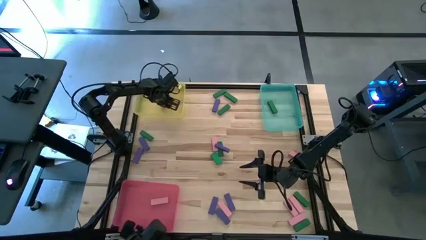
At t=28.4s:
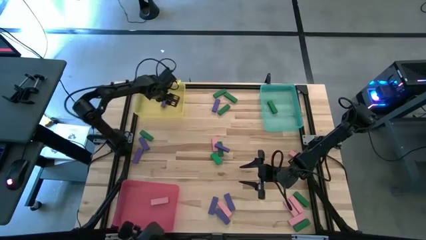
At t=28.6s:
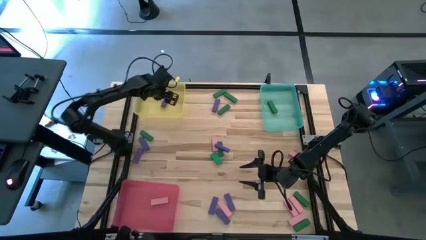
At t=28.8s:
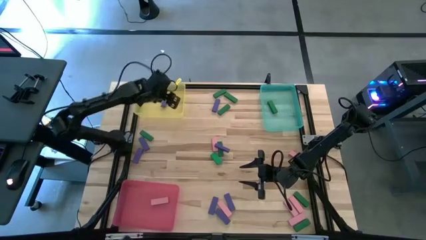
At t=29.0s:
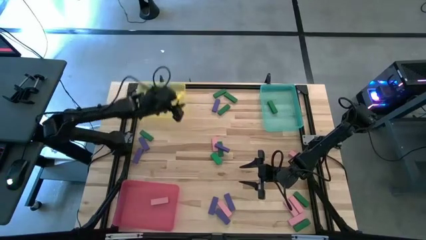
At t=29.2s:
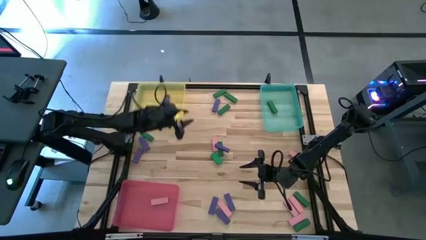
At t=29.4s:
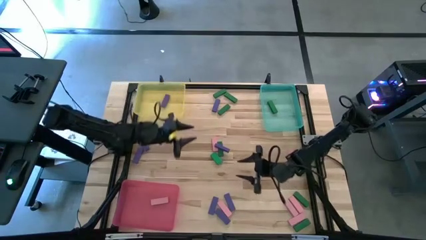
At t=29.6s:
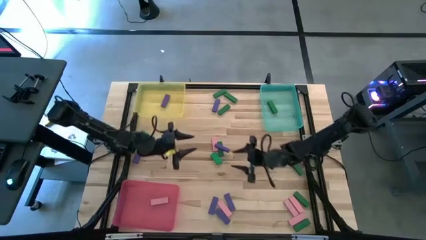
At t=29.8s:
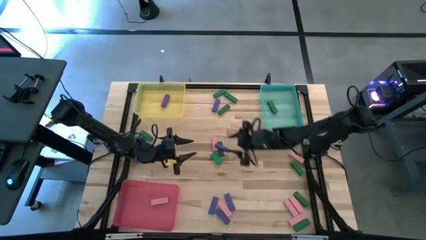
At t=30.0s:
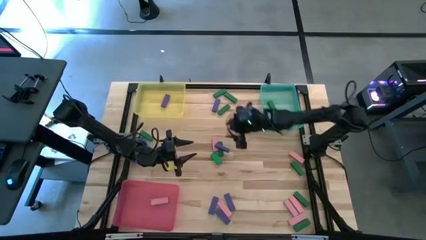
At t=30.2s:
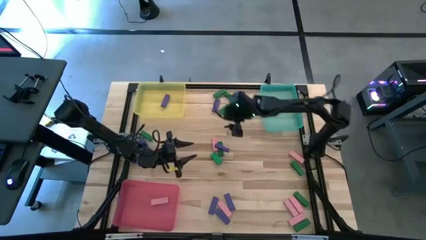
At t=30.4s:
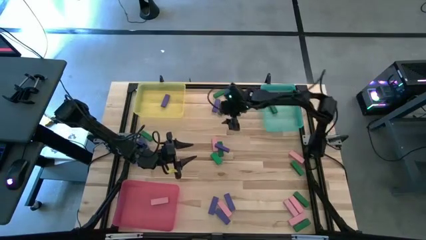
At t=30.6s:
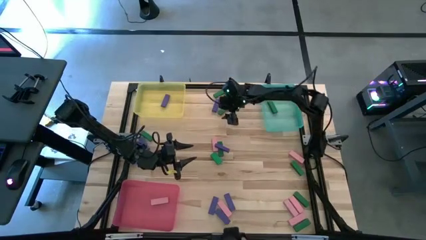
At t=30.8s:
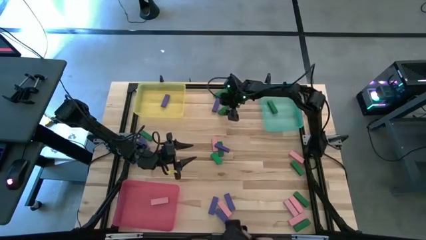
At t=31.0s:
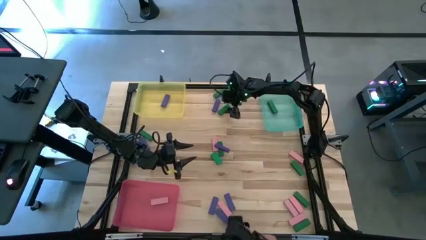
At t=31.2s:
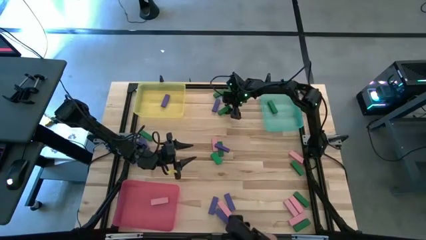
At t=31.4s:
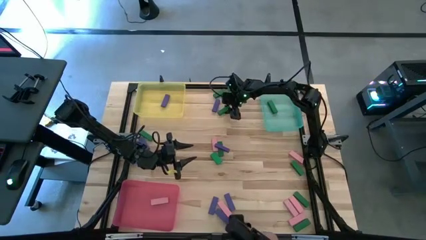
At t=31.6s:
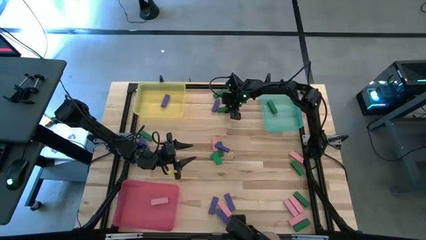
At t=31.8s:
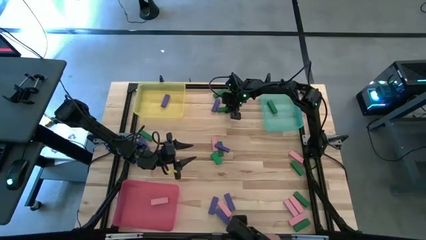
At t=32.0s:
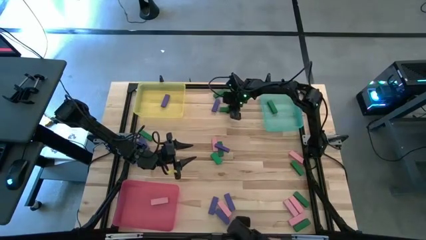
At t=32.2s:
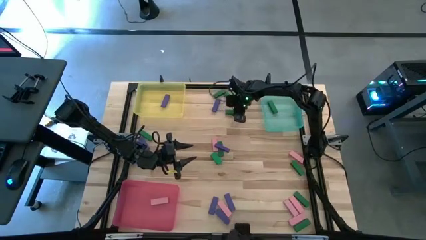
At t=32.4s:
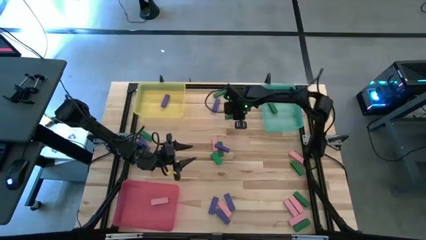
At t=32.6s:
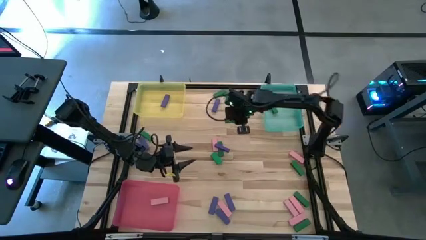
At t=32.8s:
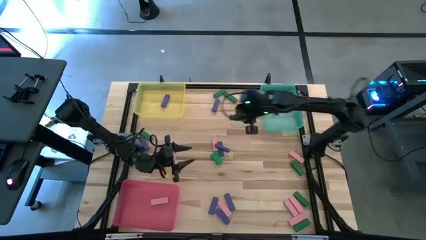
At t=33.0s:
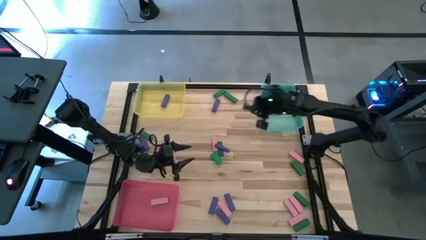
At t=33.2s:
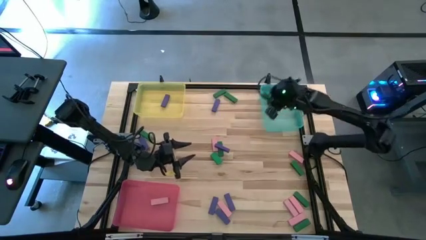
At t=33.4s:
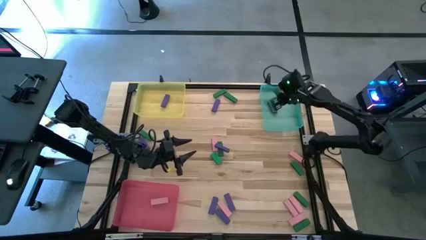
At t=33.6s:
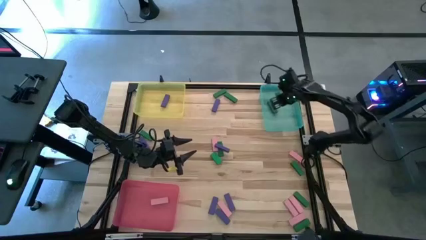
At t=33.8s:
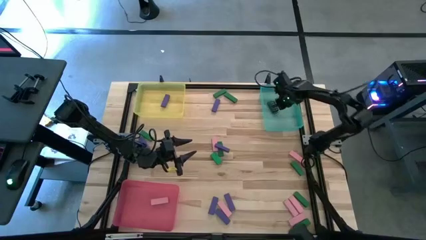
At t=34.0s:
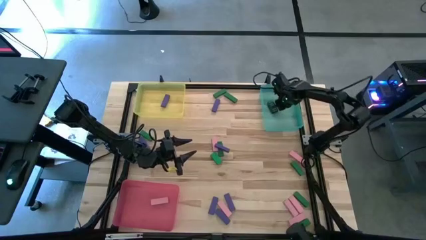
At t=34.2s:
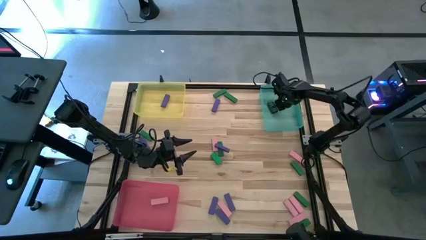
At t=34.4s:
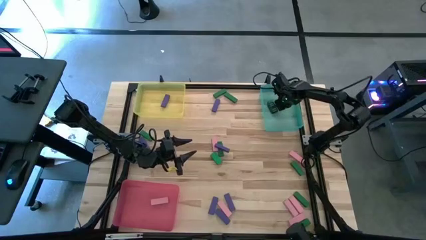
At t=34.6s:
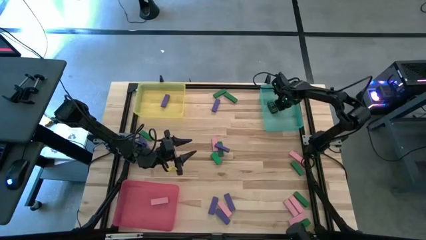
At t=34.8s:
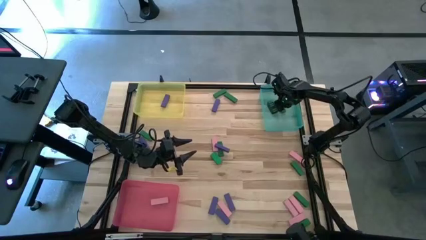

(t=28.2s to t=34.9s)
Task: Sort blocks
Put the green wooden block into the green bin

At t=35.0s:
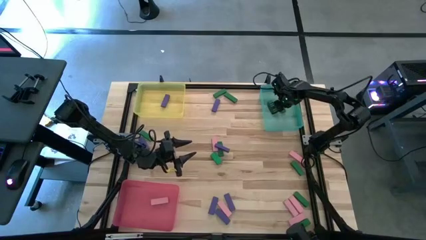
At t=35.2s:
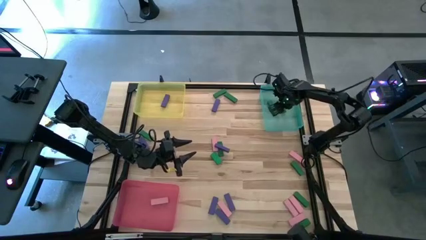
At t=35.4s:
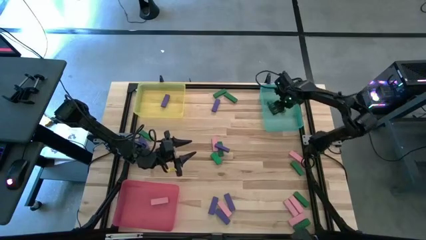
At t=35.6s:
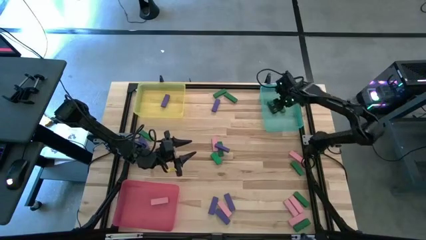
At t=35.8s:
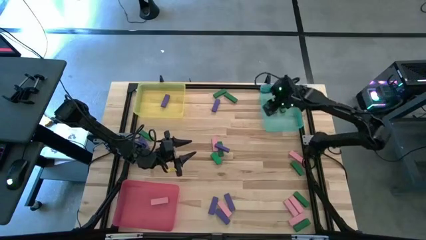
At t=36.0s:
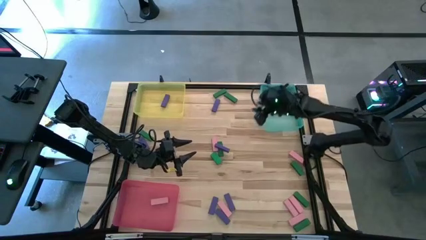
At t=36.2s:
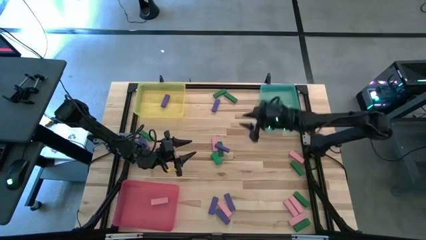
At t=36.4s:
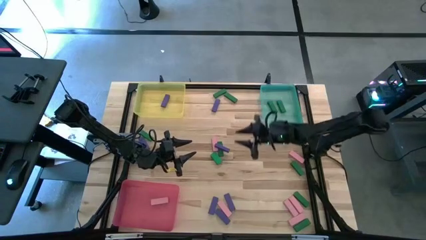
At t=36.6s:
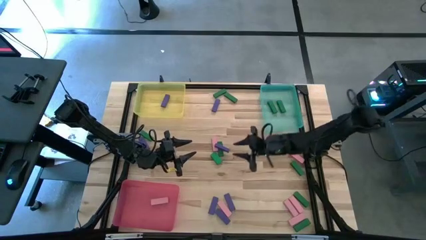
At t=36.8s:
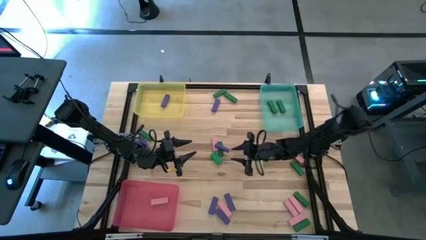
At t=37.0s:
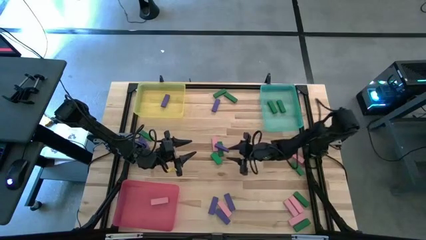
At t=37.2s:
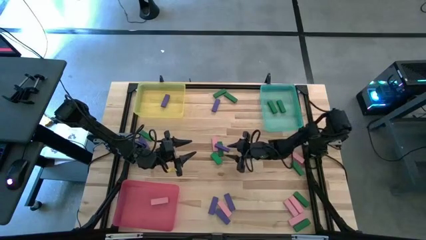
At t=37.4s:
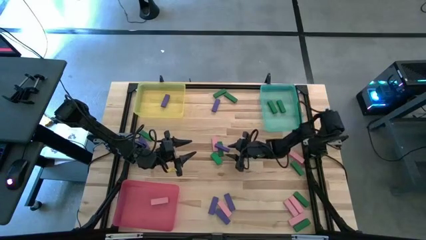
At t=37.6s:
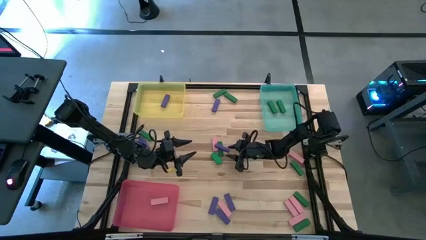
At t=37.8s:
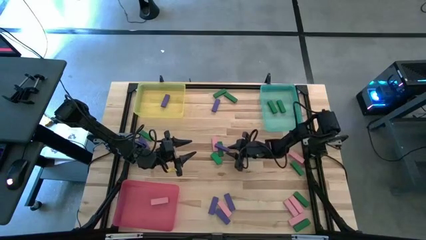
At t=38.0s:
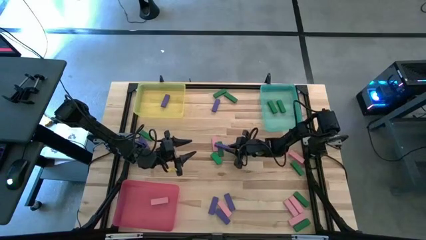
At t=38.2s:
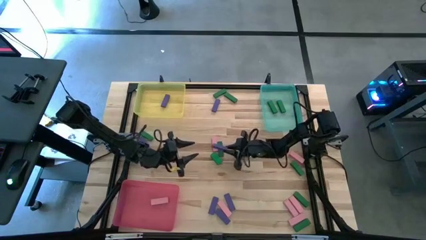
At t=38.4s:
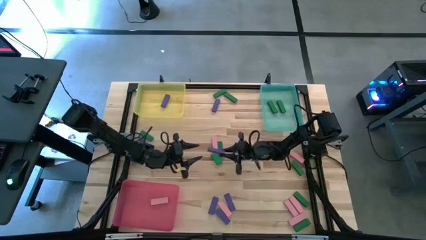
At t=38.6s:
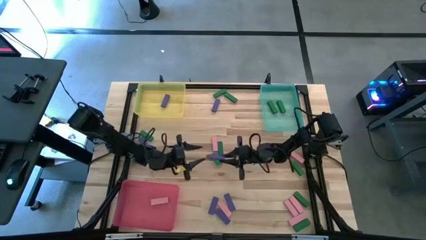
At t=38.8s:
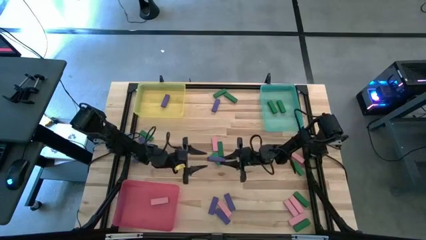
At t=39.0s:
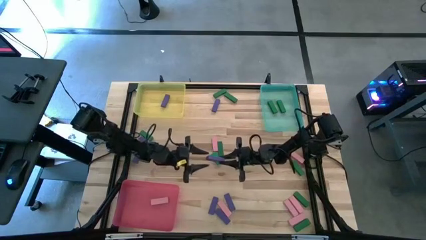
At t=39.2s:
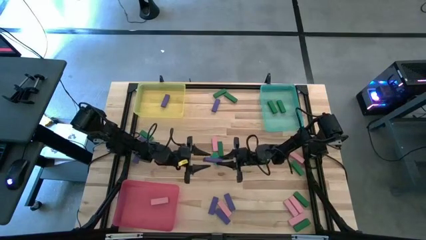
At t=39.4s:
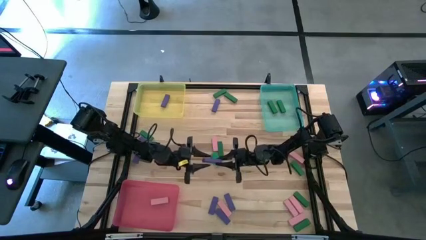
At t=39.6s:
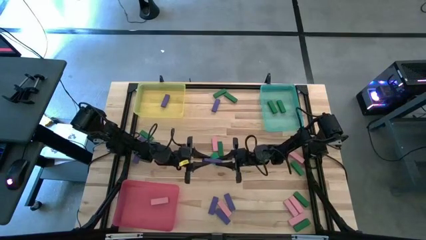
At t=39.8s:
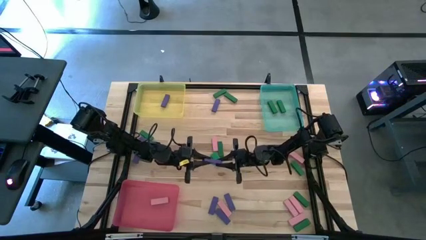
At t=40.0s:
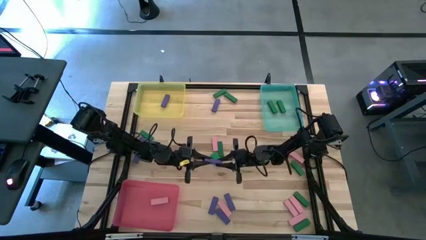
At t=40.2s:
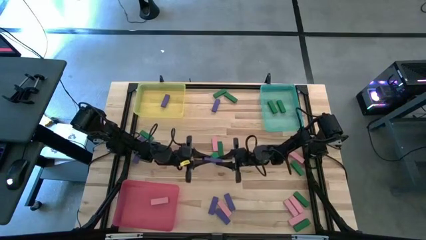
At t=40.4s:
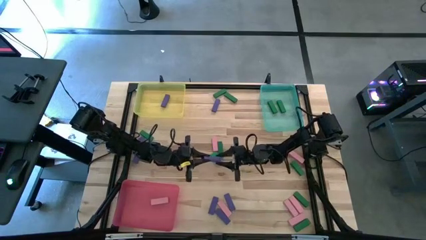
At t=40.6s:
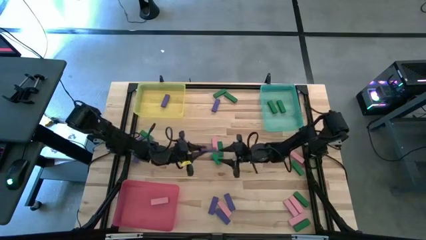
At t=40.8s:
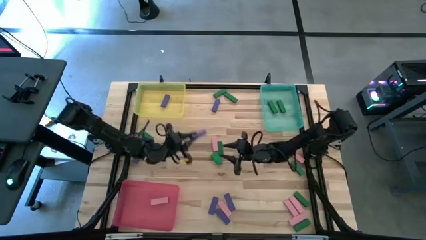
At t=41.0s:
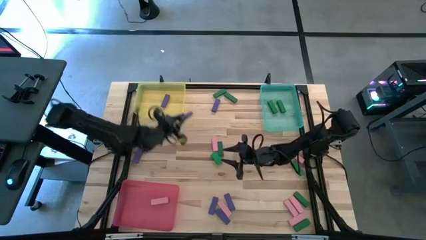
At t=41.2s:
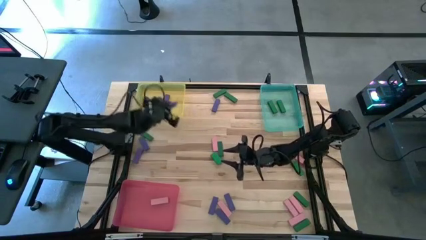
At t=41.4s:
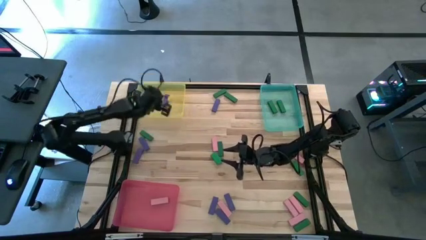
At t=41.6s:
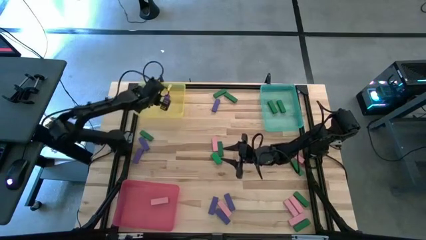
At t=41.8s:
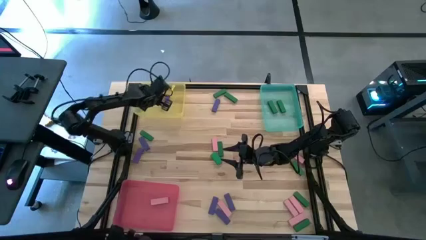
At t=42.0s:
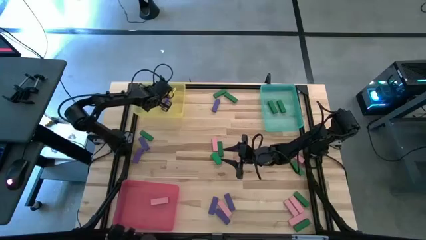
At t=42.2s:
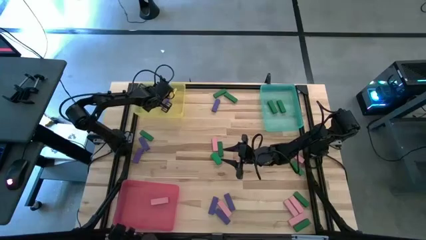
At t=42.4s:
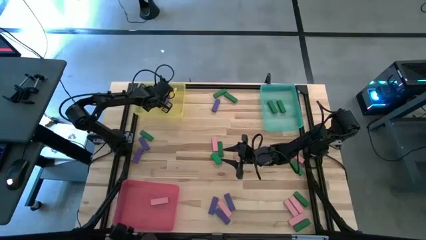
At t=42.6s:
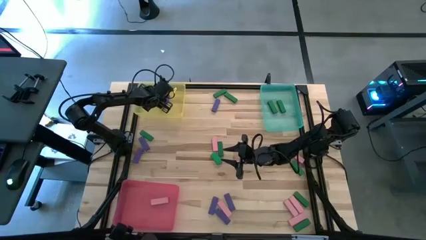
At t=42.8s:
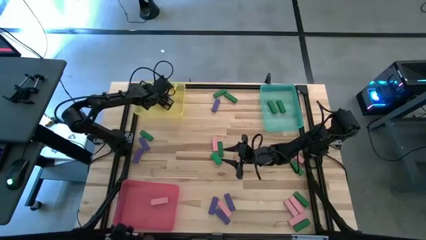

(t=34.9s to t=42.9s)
Put the purple wooden block into the yellow bin

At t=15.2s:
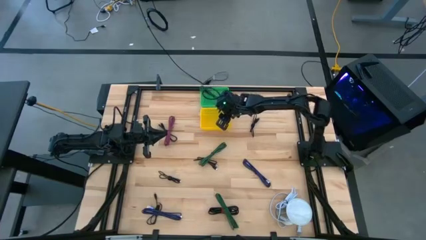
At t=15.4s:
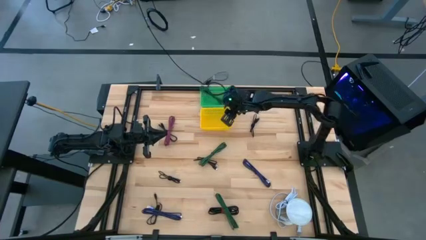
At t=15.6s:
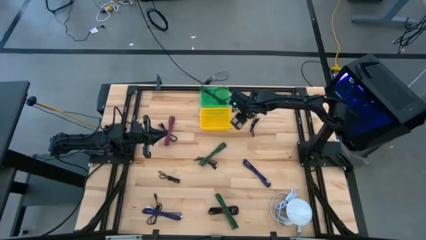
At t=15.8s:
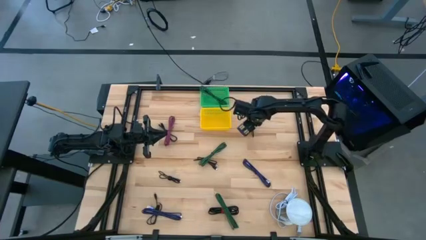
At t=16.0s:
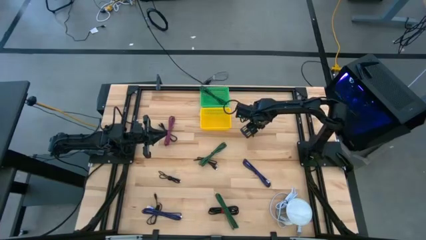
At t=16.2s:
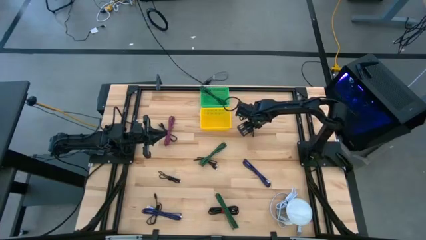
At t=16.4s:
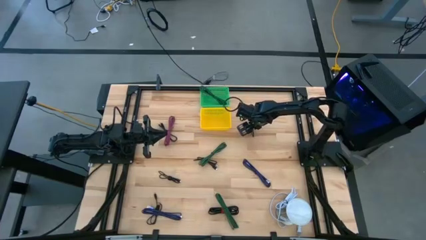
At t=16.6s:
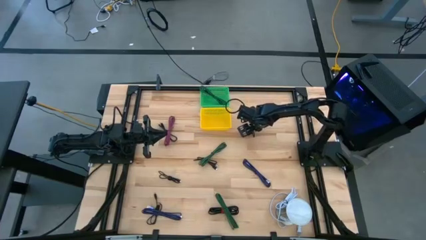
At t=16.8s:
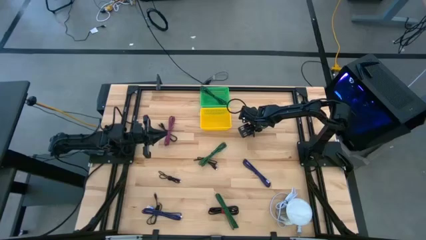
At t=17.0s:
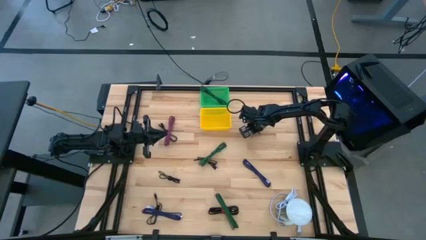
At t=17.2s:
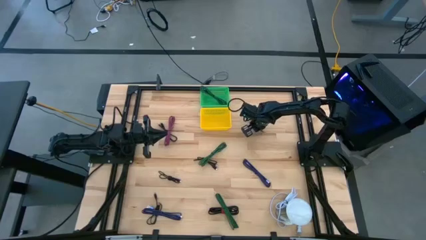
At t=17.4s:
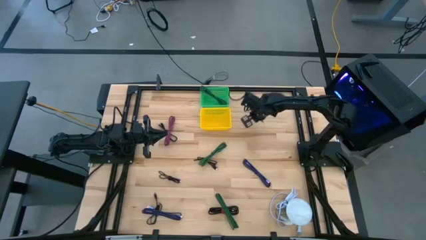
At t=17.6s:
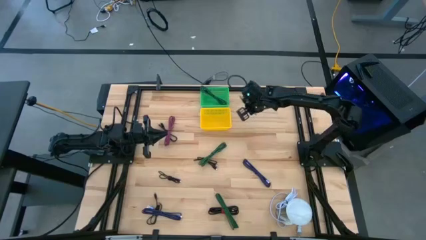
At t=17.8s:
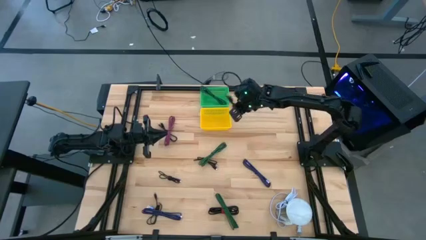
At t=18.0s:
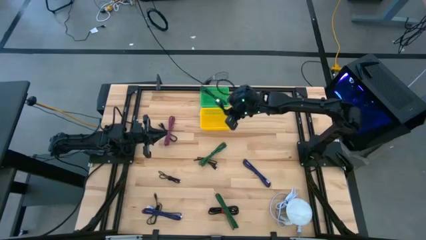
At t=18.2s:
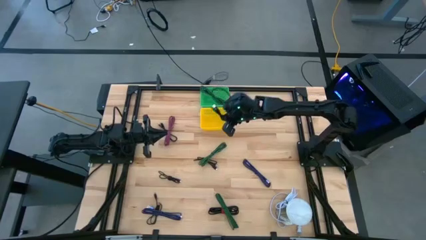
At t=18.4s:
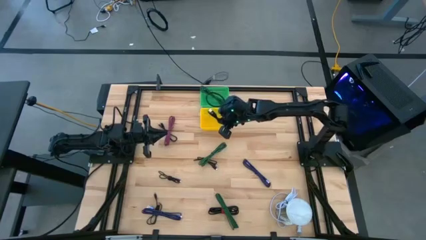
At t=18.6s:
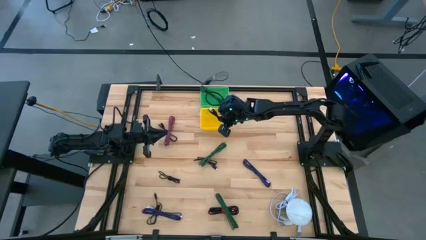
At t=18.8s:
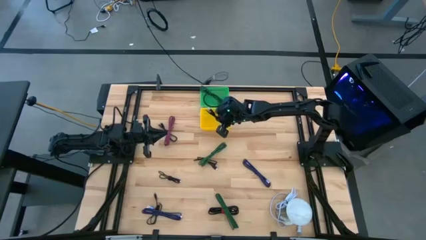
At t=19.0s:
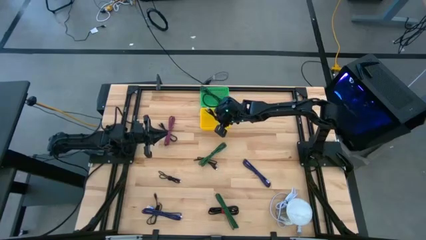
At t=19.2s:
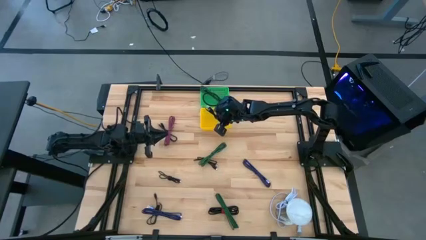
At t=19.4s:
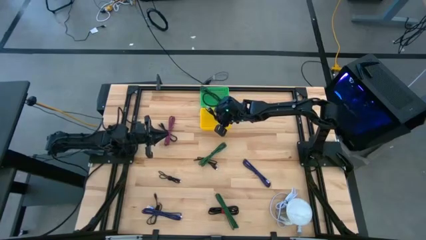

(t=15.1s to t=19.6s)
Task: Pick & Place USB Port
Put the right black charger cable into the yellow basket
